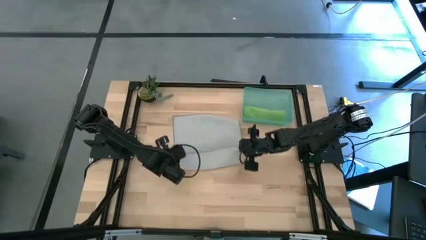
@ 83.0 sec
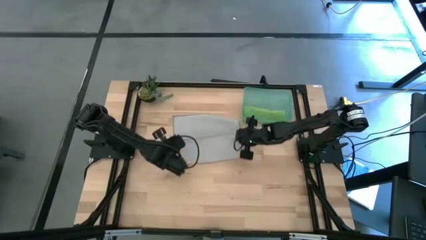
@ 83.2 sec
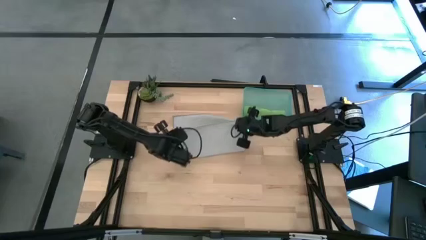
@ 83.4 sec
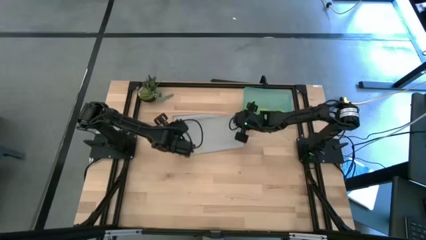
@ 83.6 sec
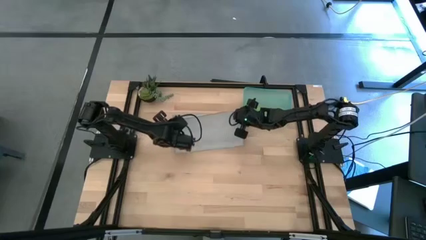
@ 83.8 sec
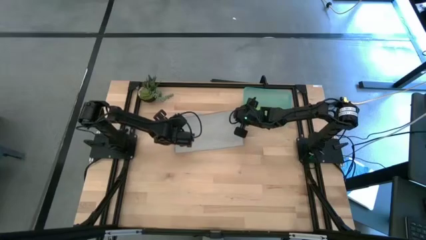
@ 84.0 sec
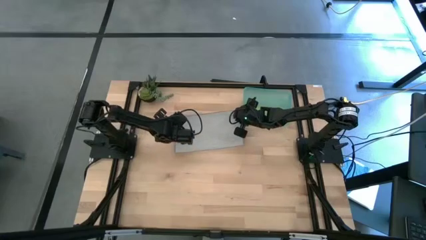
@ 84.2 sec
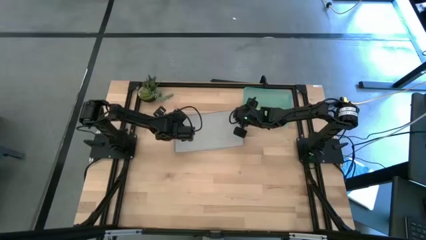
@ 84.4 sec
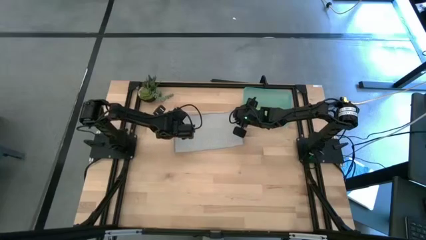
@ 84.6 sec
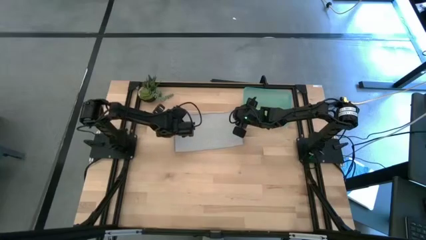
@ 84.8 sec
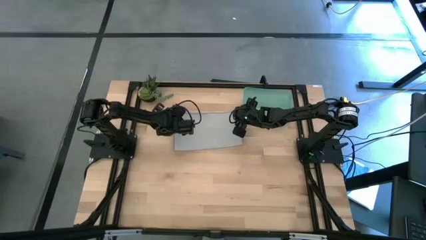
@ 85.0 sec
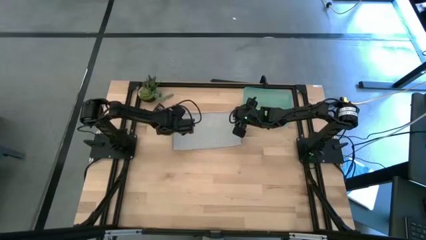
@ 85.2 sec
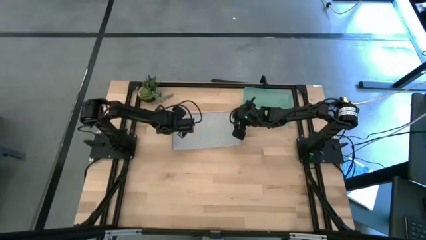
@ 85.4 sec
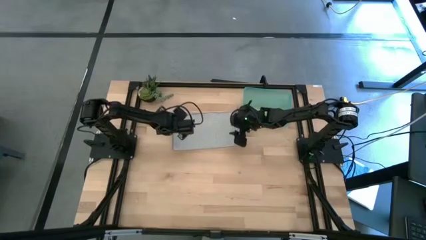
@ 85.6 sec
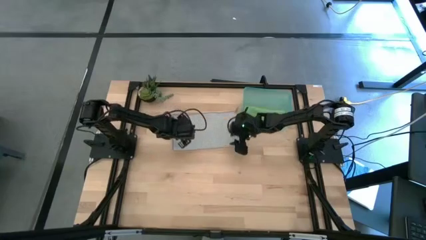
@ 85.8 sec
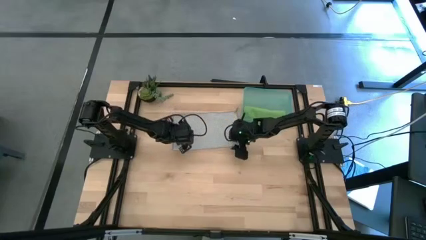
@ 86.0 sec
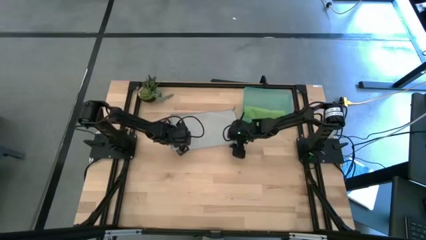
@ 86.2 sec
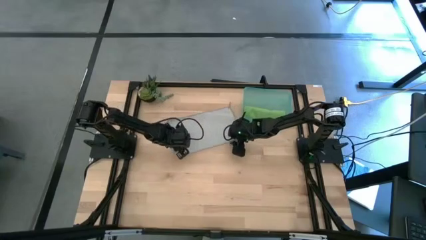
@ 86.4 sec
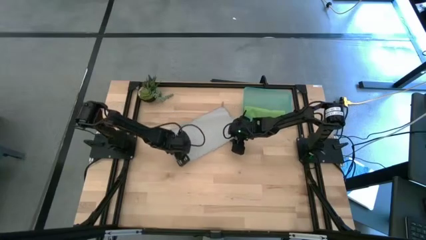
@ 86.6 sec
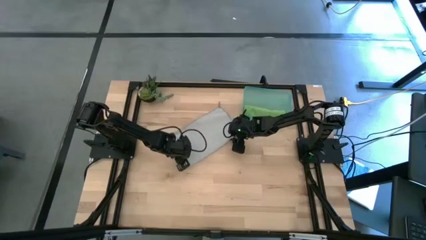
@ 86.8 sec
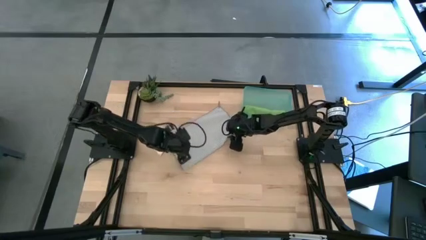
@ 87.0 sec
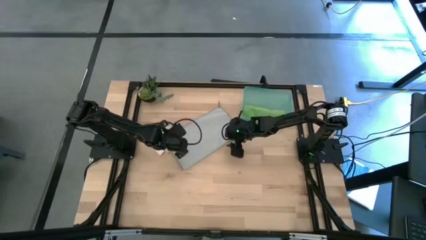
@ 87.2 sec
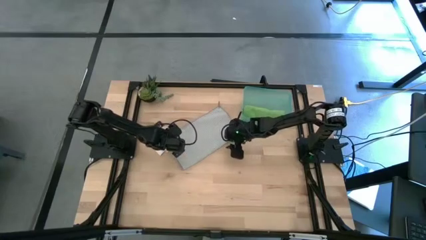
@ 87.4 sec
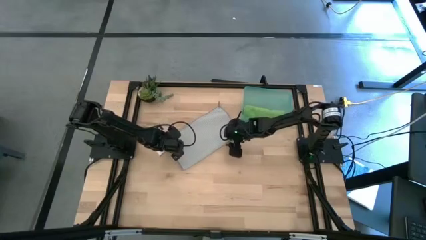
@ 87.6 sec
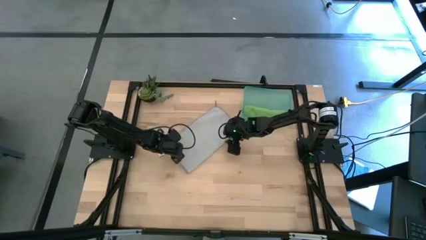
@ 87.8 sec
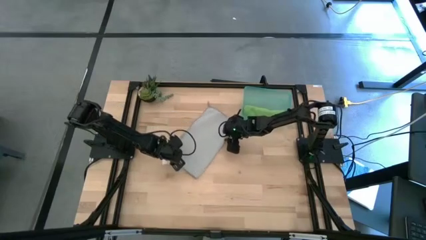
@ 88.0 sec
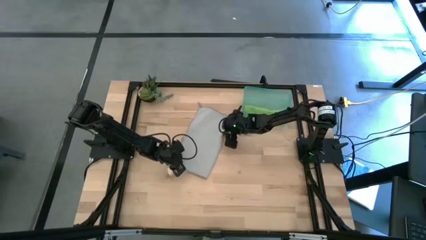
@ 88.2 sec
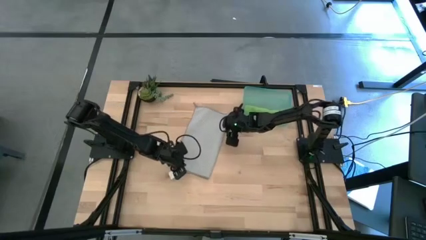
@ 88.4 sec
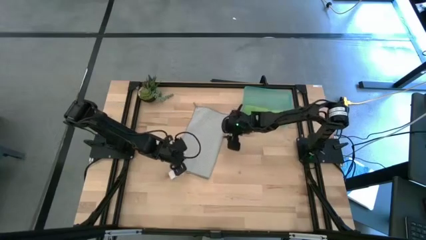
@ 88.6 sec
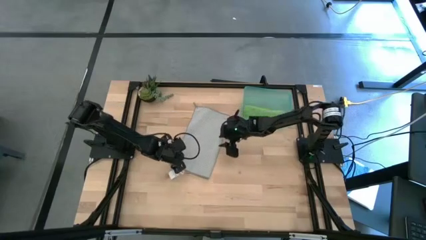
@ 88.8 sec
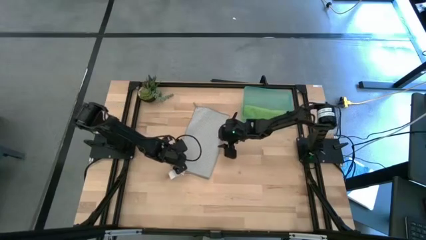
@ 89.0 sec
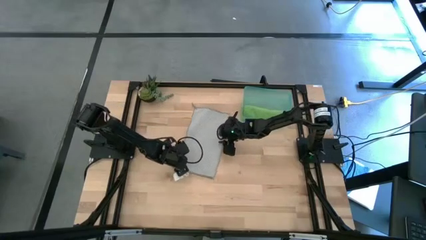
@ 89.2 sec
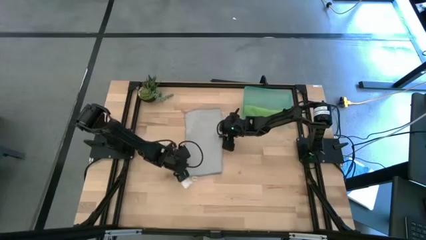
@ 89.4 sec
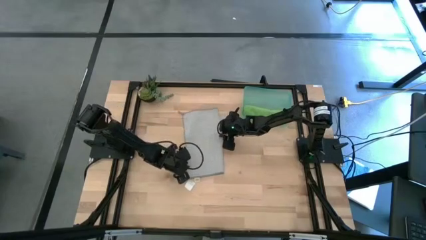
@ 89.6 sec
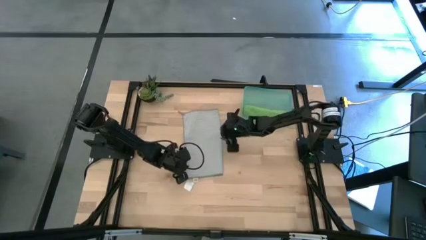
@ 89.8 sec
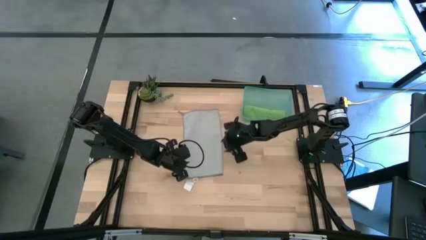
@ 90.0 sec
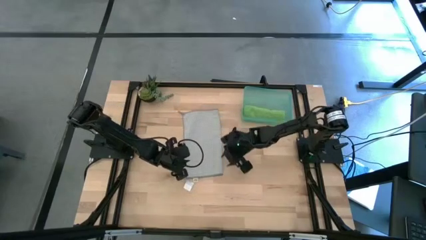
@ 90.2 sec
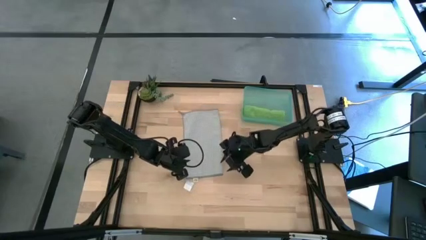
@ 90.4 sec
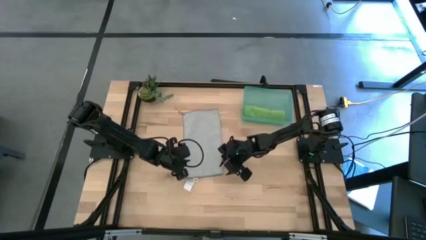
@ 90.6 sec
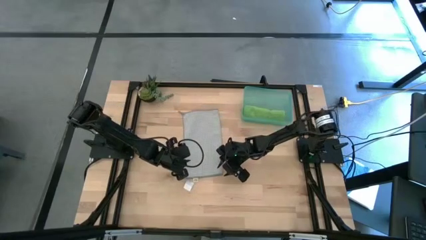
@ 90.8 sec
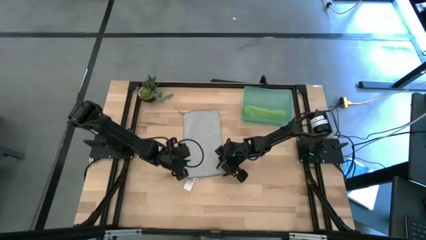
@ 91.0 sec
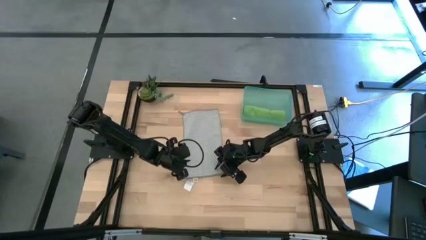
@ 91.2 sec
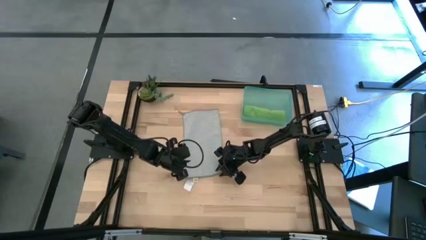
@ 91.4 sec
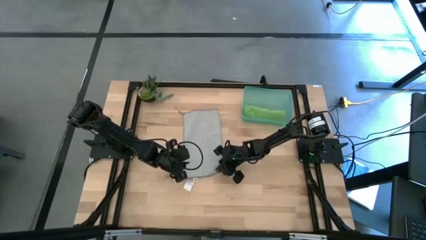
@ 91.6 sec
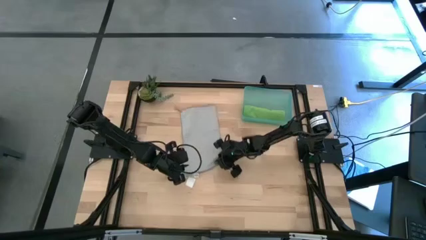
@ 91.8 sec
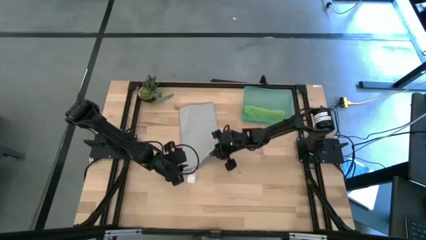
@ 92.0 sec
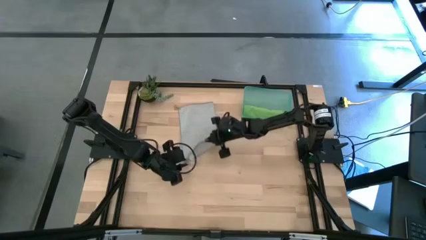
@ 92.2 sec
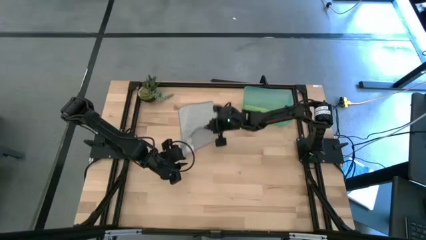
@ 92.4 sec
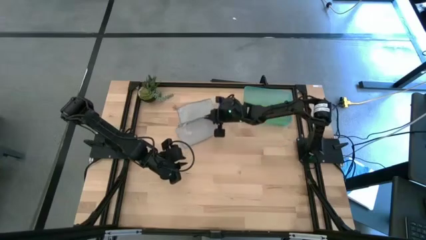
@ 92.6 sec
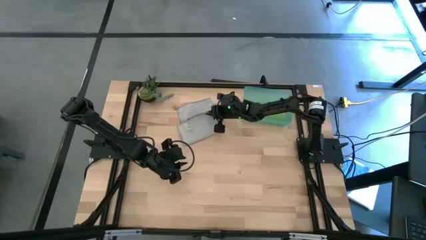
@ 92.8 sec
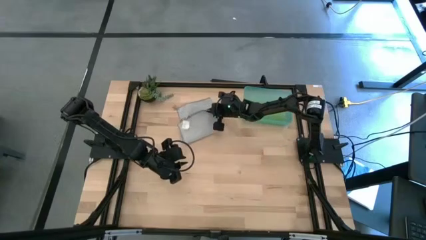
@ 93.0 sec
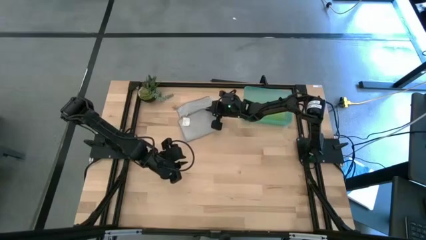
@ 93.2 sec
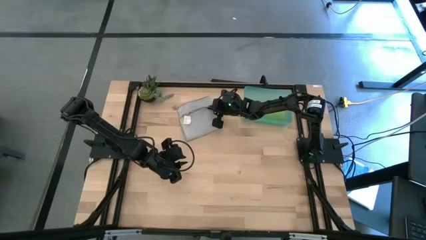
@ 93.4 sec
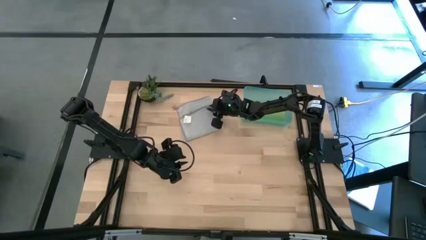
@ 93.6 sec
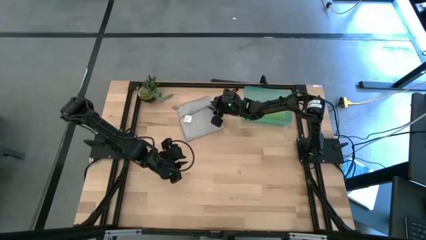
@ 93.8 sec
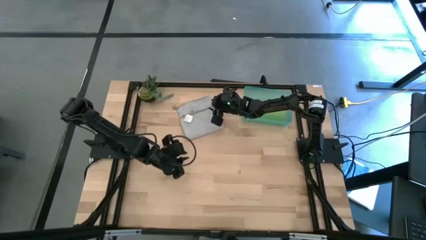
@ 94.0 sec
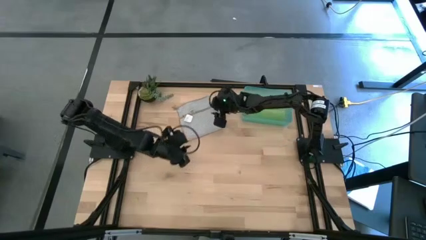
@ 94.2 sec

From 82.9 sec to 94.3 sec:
Task: Roll microfiber towels into tight, uniform cylinder then place into a basket
Fold the gray kitchen towel
